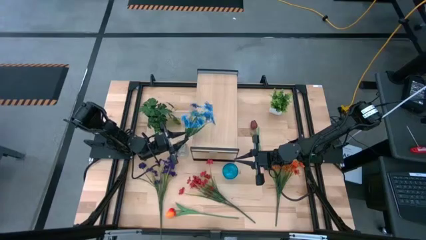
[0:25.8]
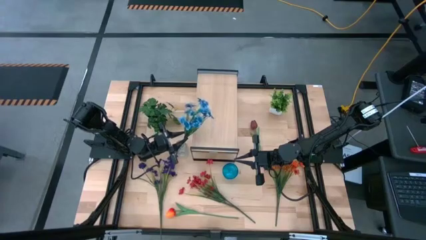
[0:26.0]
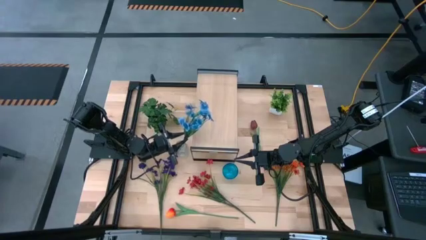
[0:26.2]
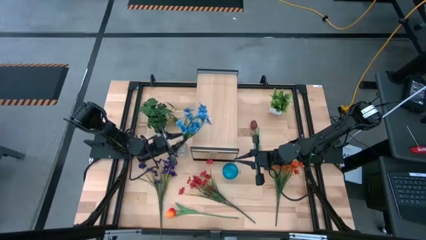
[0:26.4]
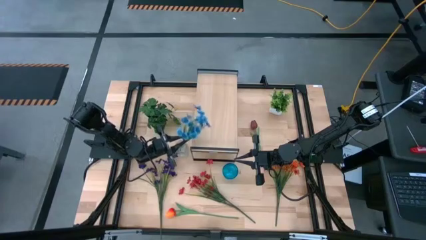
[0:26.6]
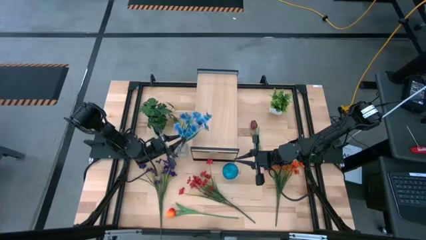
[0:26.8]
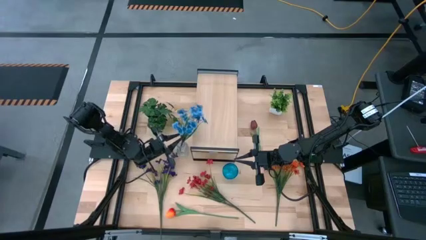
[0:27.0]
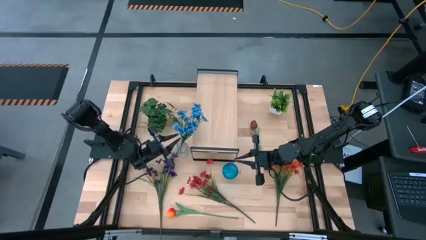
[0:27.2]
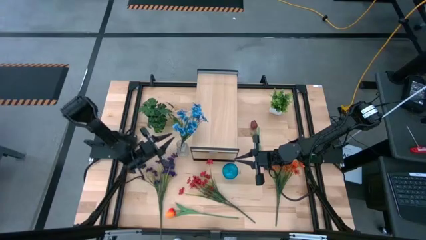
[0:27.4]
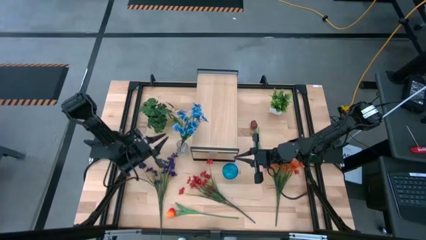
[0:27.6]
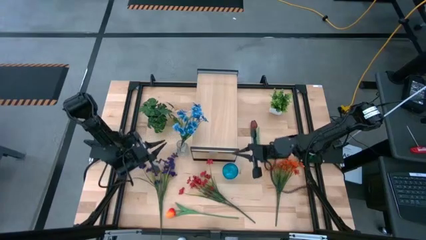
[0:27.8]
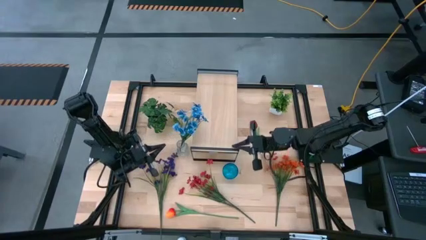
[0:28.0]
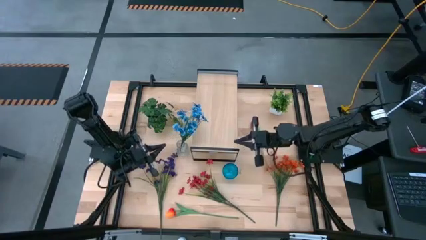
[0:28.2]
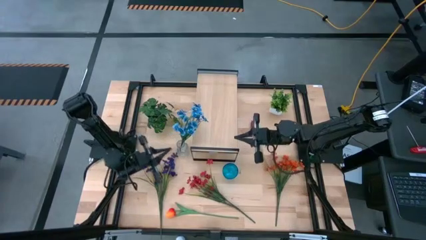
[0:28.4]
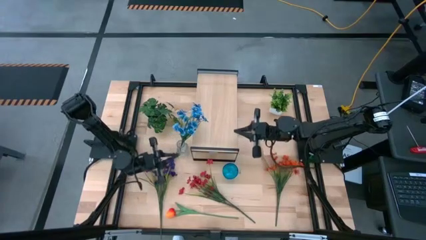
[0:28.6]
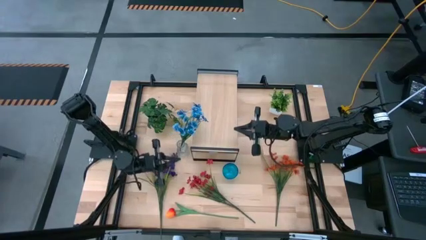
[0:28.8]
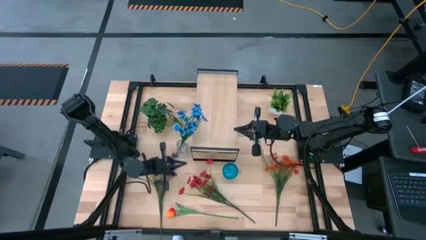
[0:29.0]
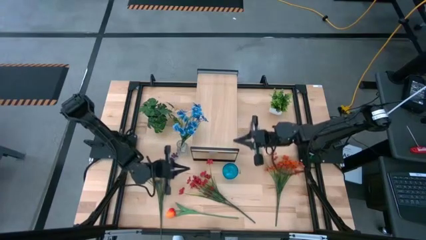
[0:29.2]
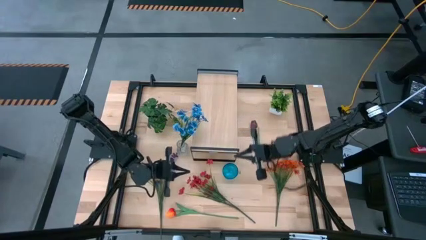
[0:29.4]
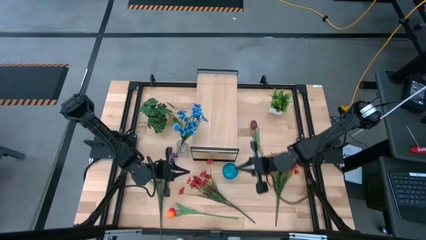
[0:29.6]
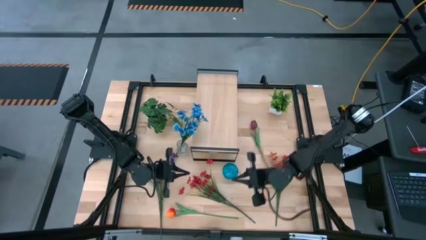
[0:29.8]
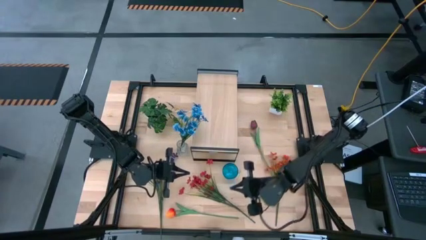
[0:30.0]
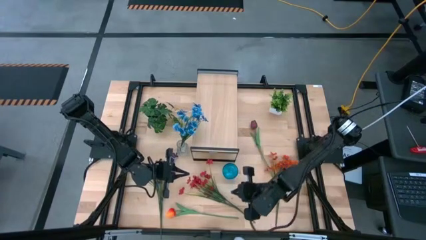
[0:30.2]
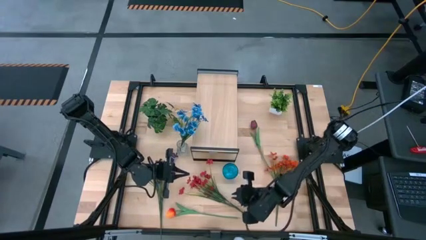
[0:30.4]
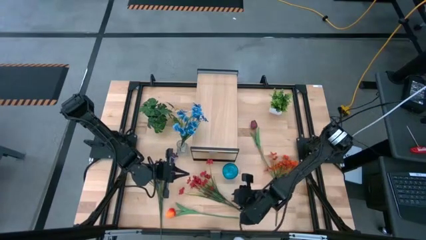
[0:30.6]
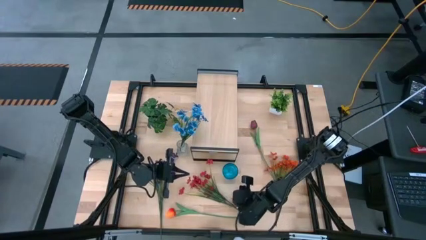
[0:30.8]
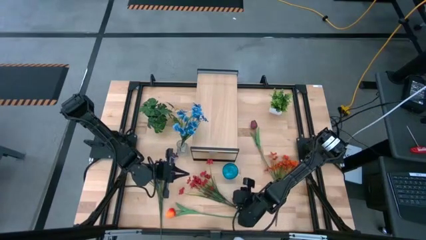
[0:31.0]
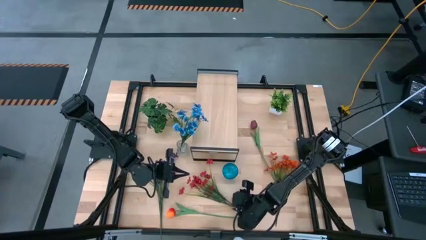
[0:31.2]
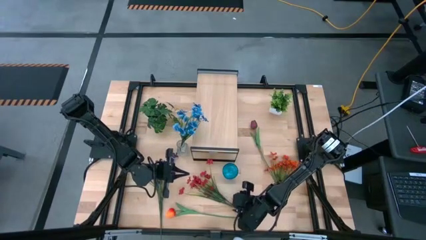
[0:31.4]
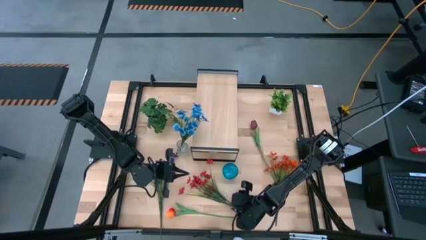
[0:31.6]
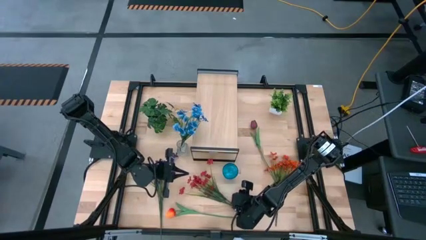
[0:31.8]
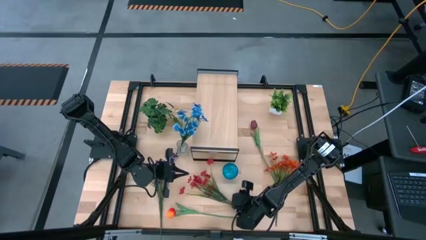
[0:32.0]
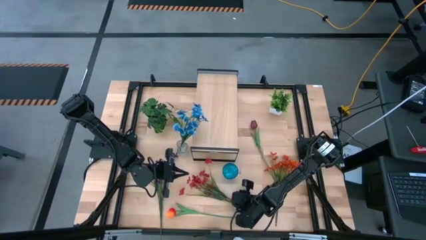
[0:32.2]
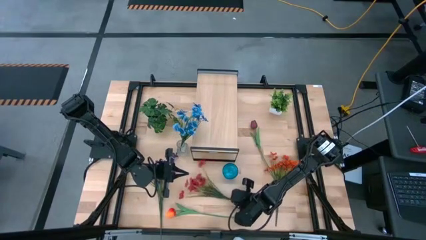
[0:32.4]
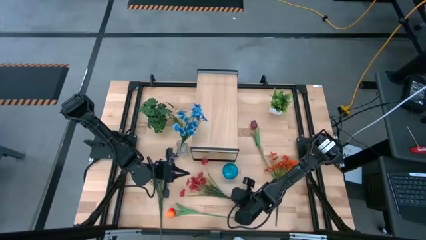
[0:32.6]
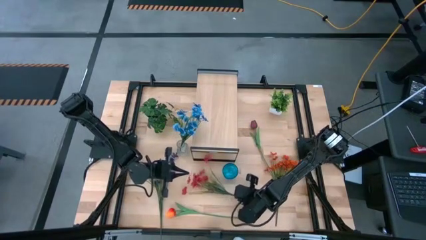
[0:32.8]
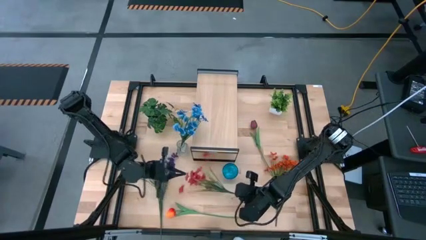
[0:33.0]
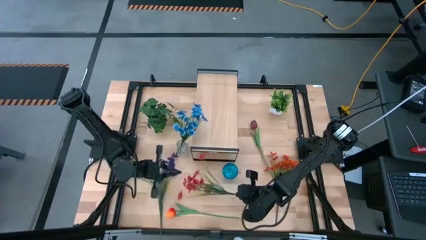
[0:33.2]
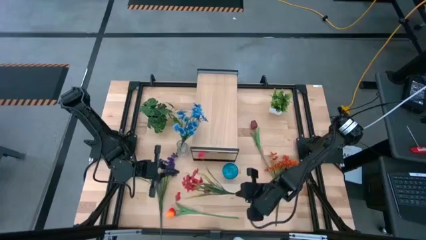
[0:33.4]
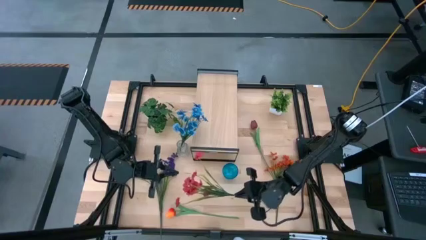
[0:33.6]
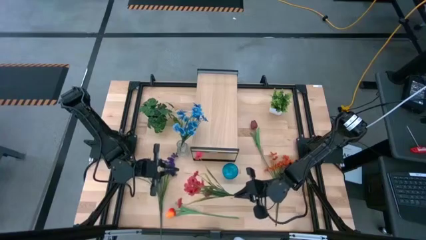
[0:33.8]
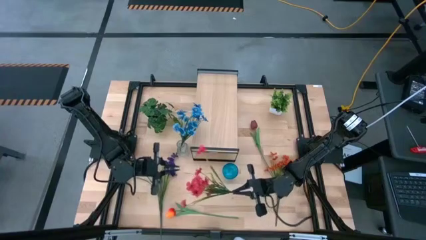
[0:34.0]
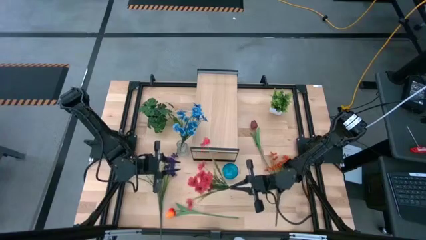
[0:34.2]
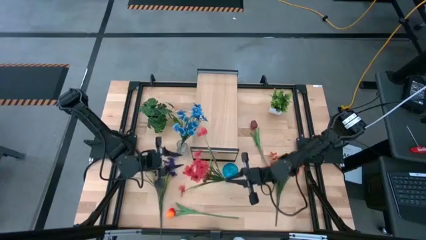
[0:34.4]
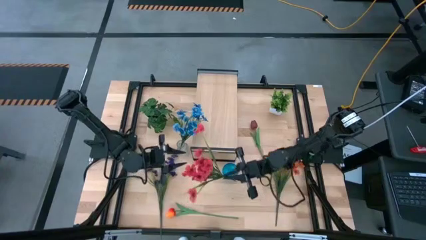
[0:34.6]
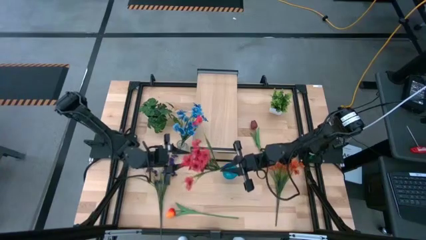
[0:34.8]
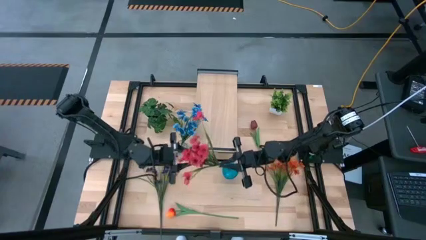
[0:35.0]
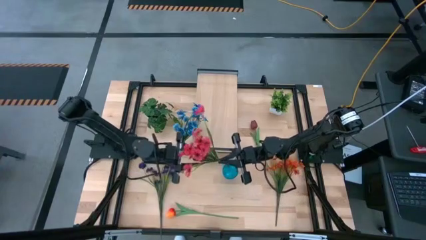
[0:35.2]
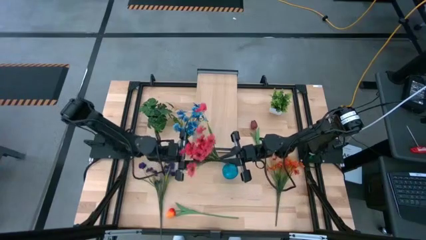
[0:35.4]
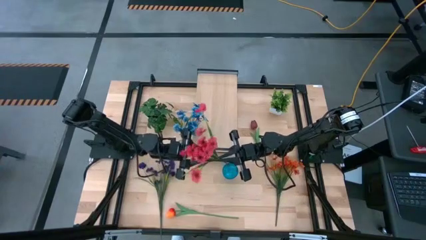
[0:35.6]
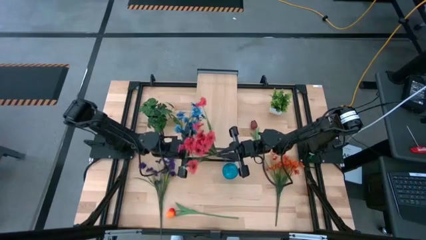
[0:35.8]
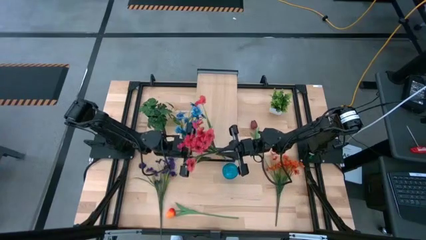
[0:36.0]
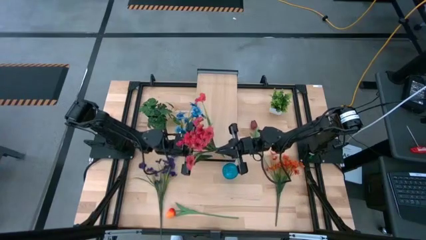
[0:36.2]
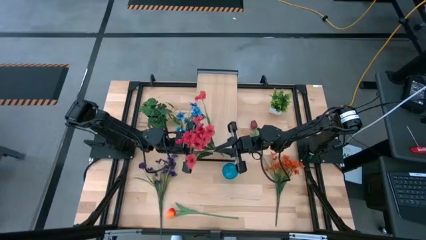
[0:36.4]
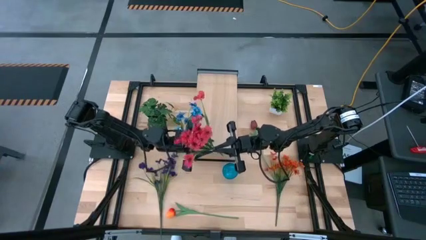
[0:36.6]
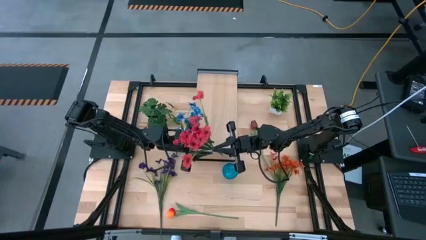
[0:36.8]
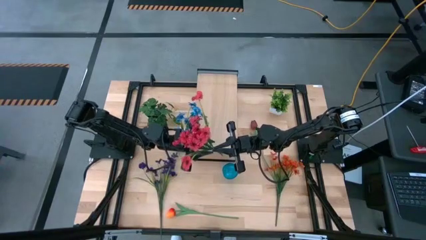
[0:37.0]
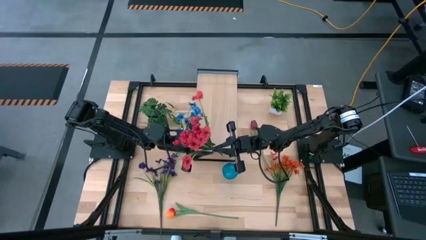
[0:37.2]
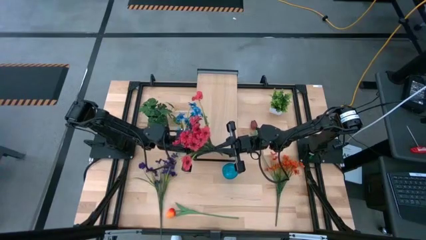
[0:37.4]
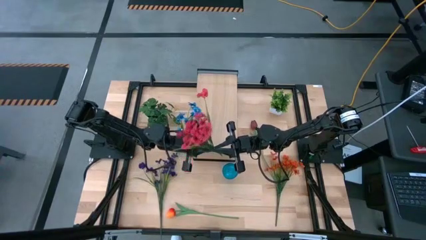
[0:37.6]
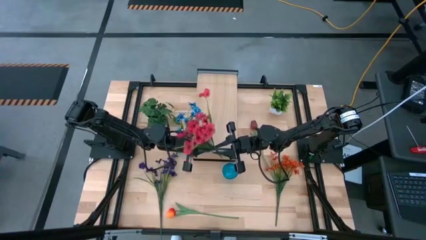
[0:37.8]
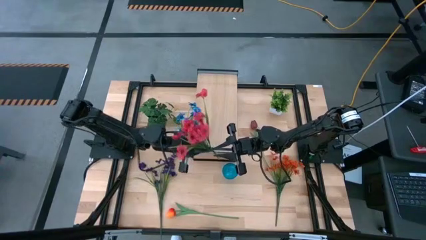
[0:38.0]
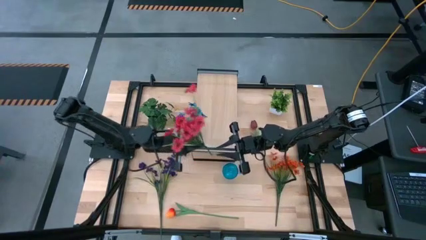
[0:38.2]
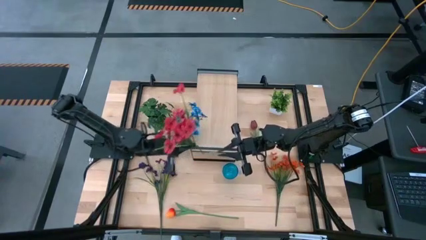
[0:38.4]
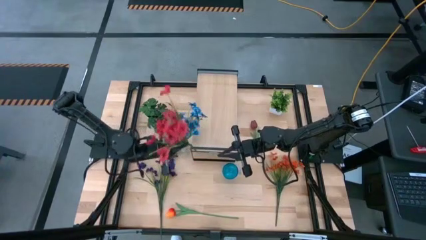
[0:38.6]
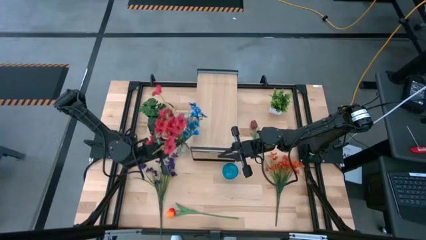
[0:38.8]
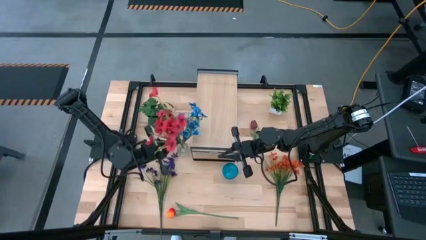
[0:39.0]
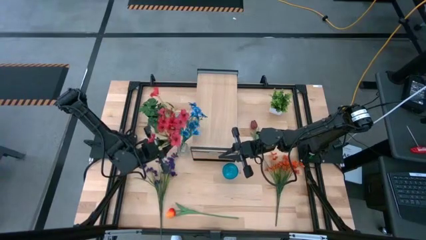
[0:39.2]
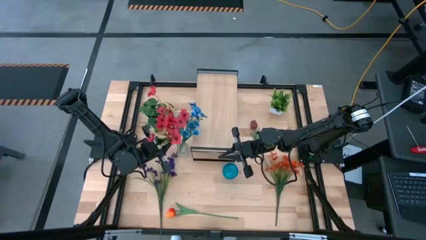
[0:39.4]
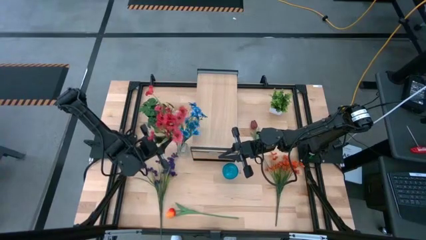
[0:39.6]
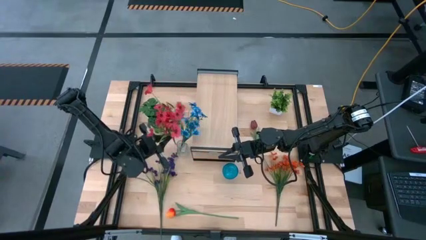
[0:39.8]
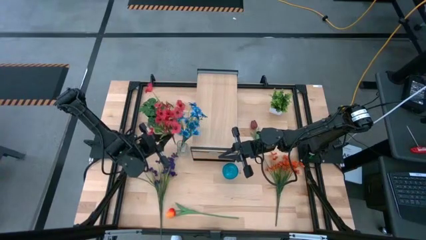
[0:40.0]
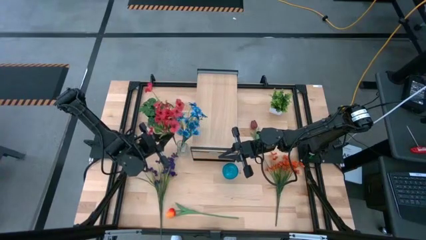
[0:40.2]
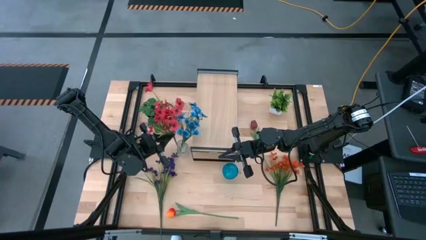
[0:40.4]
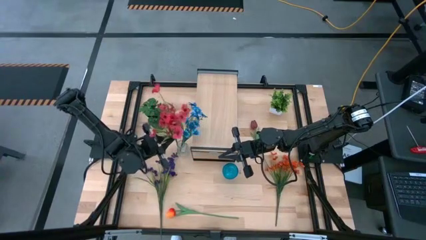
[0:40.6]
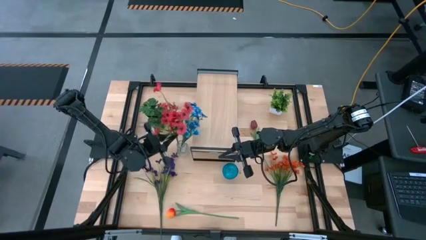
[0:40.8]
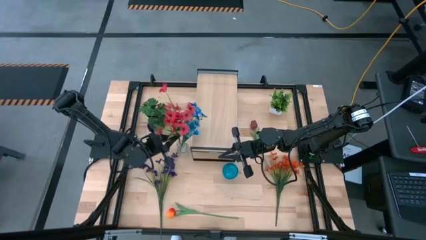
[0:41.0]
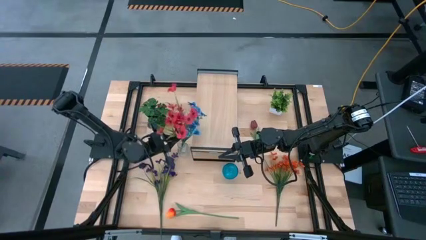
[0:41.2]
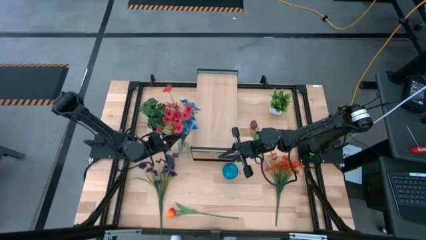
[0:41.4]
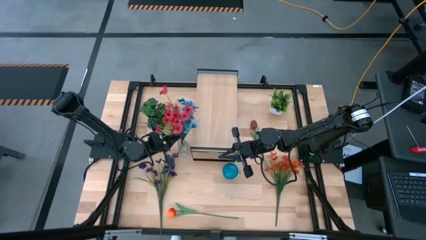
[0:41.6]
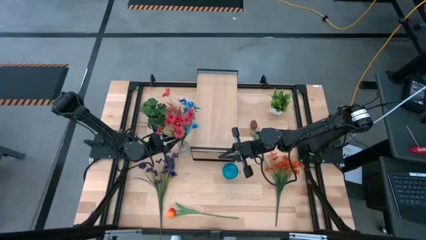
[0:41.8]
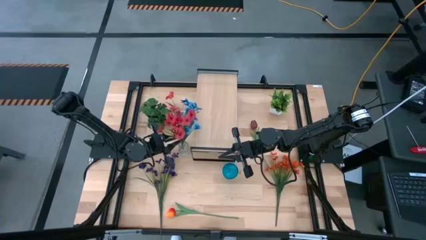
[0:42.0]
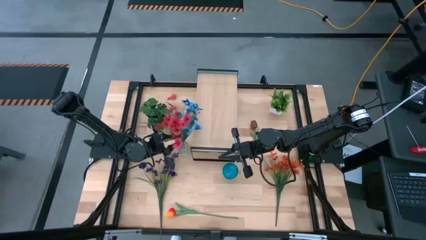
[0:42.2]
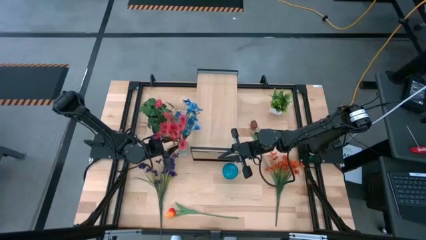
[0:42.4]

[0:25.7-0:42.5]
Task: Pick and place flowers into a vace then onto a shelf
Put the red flowers into the transparent vase
